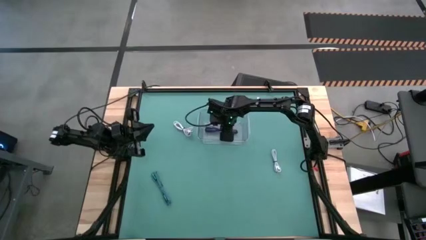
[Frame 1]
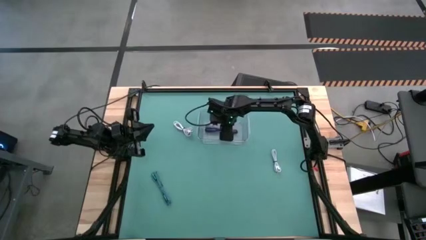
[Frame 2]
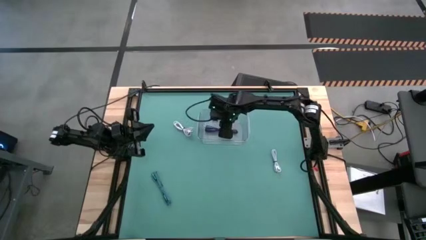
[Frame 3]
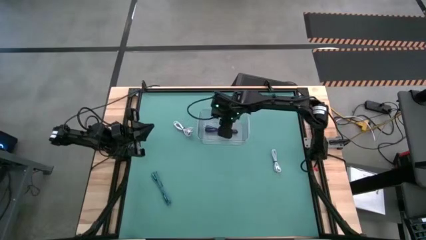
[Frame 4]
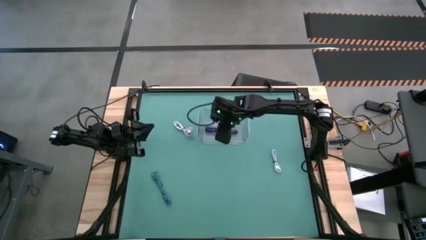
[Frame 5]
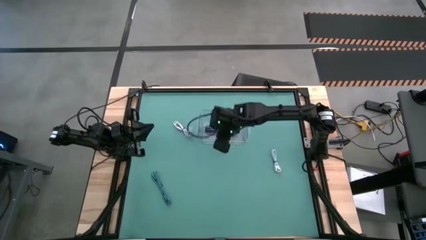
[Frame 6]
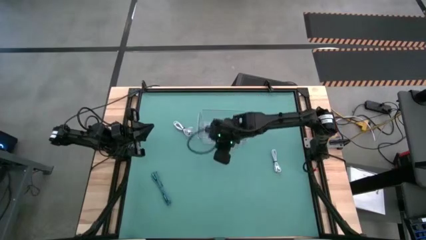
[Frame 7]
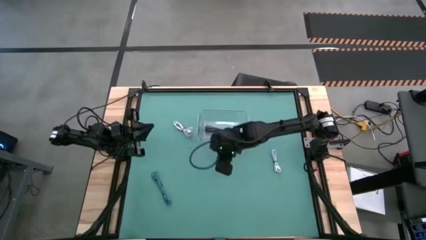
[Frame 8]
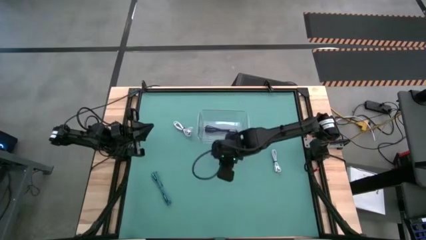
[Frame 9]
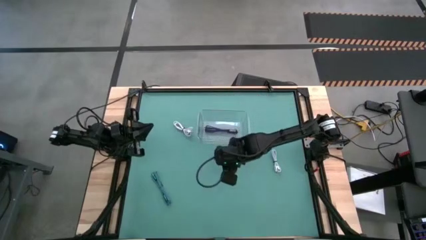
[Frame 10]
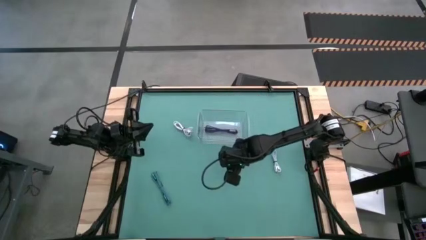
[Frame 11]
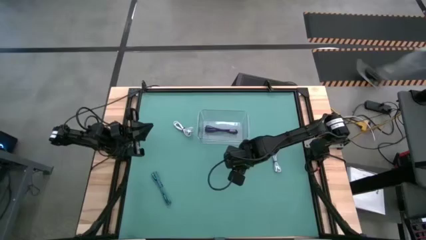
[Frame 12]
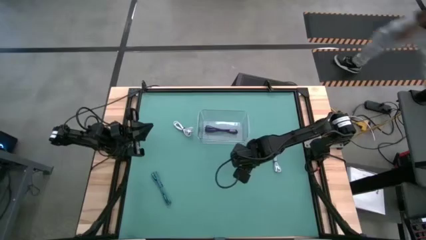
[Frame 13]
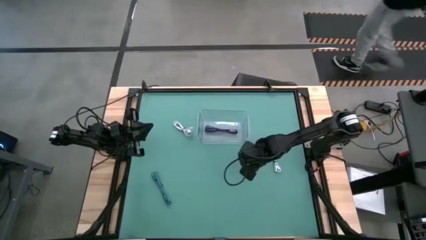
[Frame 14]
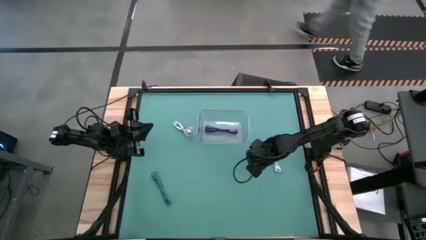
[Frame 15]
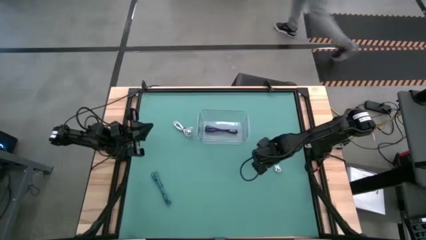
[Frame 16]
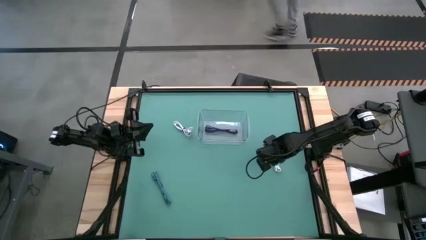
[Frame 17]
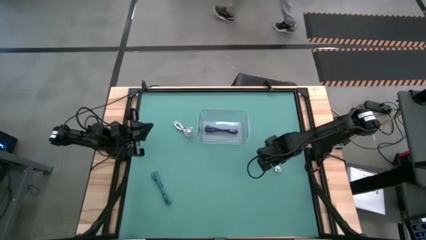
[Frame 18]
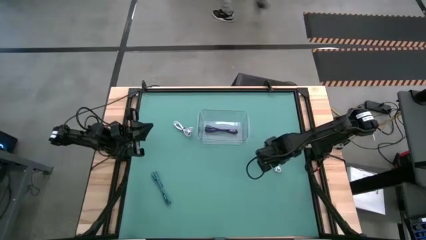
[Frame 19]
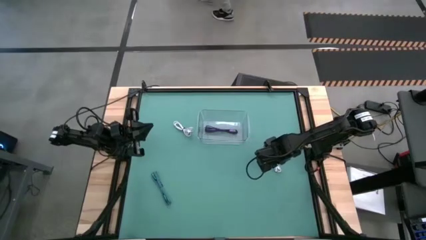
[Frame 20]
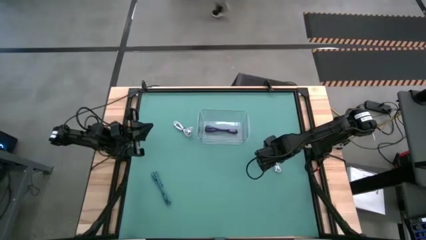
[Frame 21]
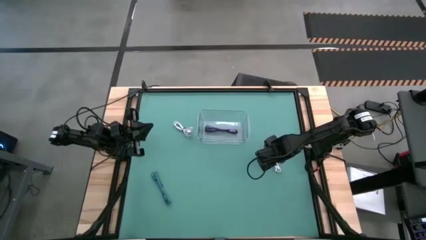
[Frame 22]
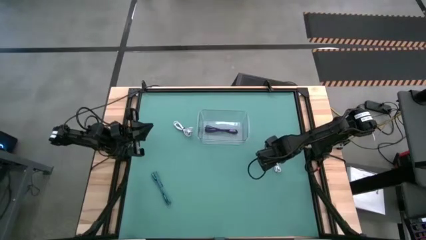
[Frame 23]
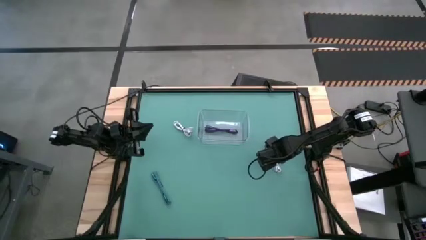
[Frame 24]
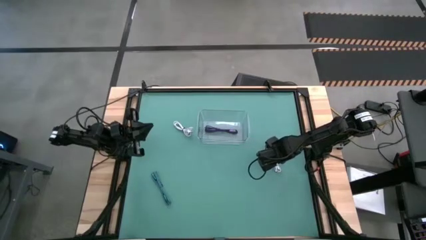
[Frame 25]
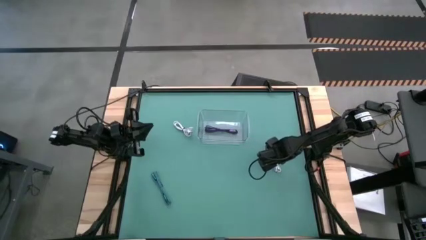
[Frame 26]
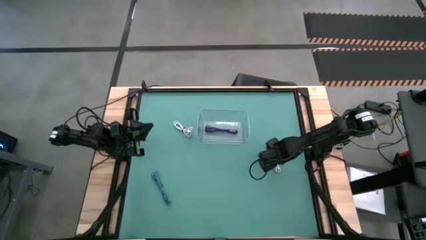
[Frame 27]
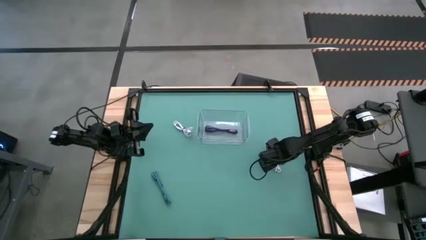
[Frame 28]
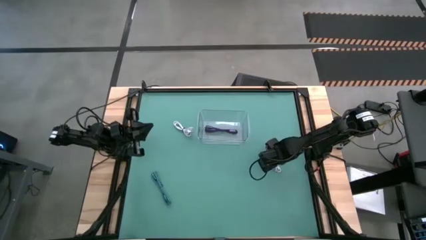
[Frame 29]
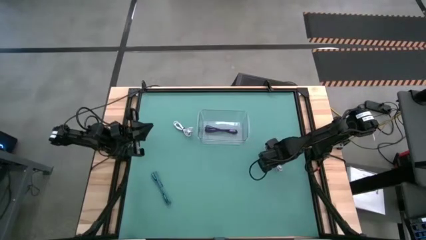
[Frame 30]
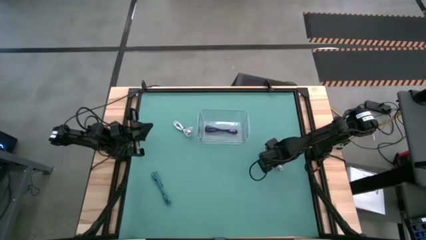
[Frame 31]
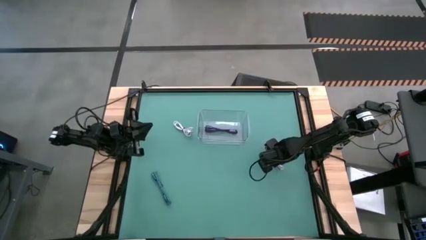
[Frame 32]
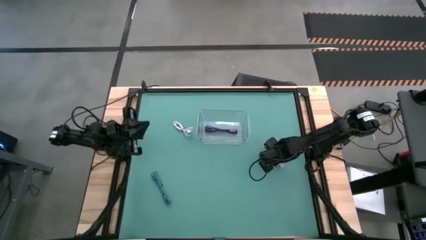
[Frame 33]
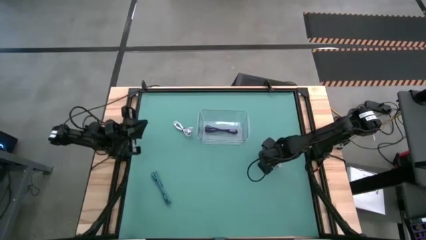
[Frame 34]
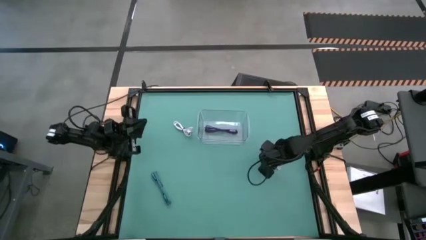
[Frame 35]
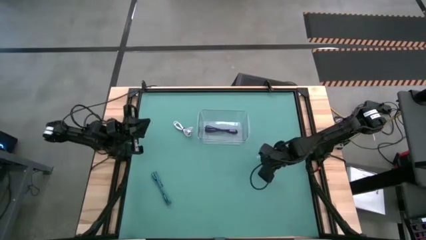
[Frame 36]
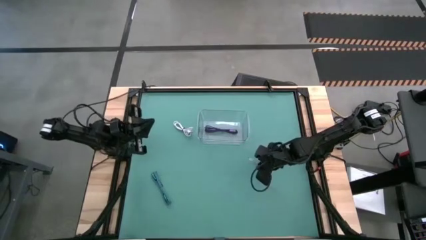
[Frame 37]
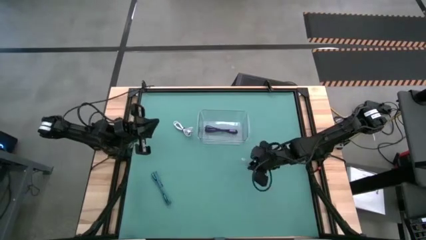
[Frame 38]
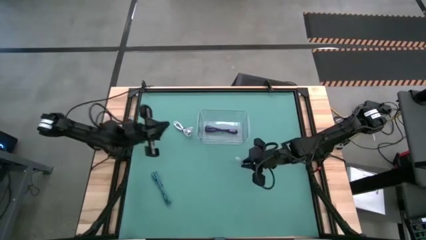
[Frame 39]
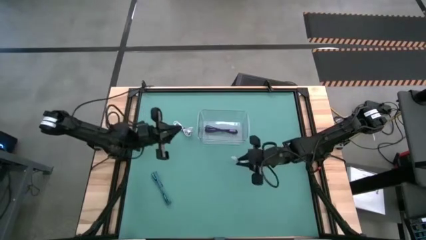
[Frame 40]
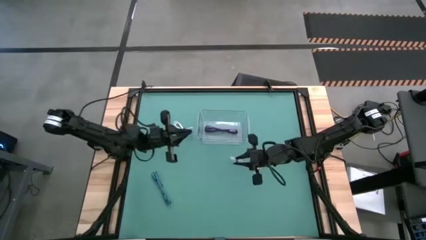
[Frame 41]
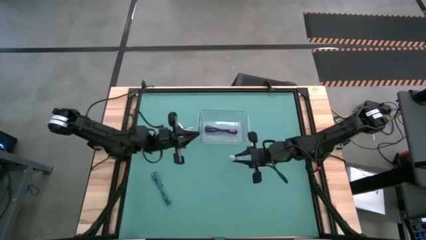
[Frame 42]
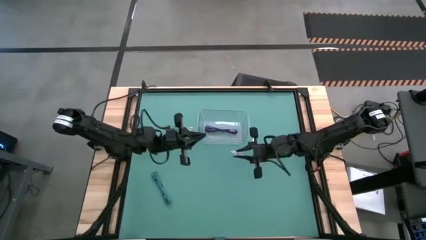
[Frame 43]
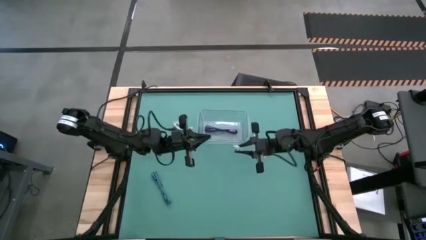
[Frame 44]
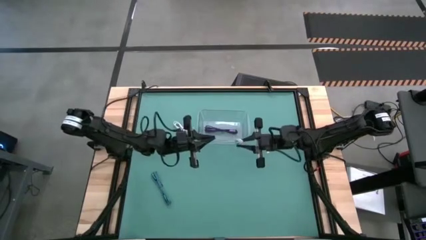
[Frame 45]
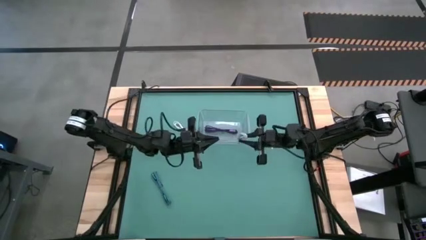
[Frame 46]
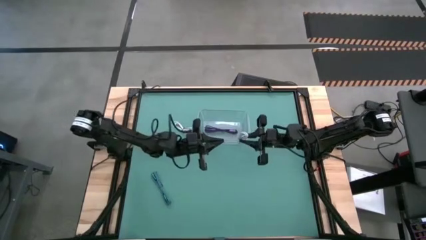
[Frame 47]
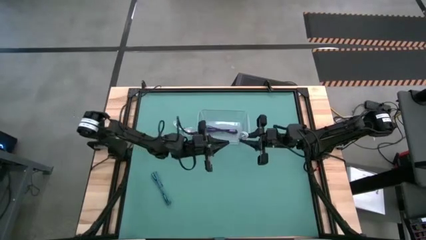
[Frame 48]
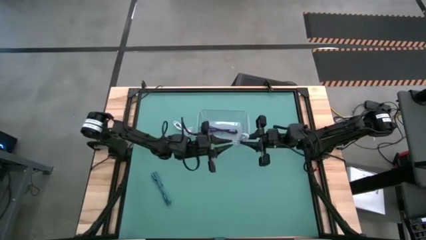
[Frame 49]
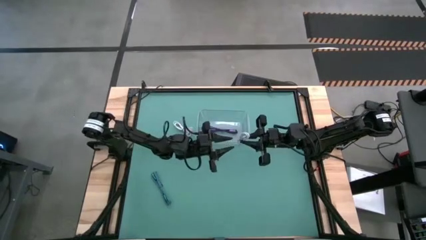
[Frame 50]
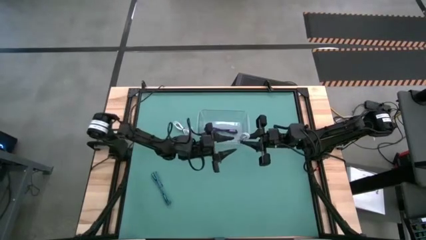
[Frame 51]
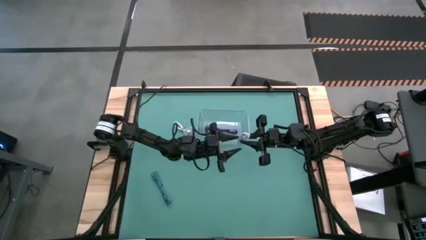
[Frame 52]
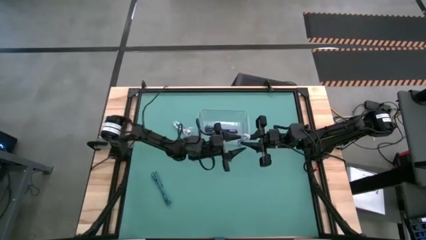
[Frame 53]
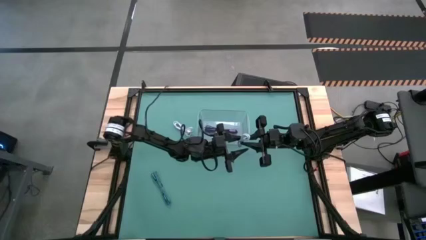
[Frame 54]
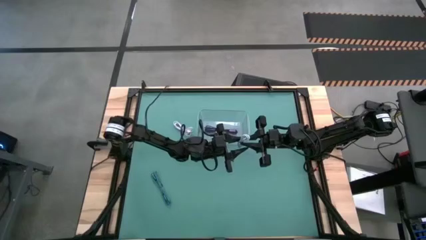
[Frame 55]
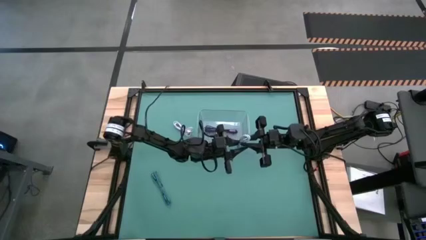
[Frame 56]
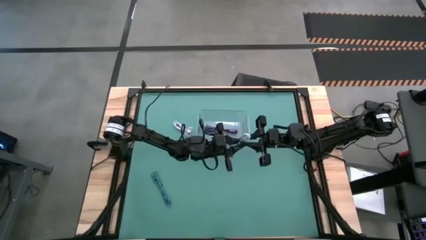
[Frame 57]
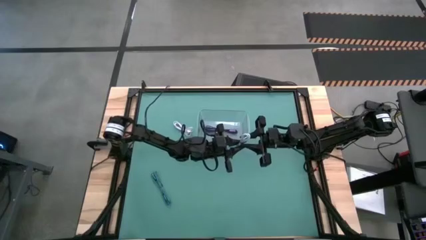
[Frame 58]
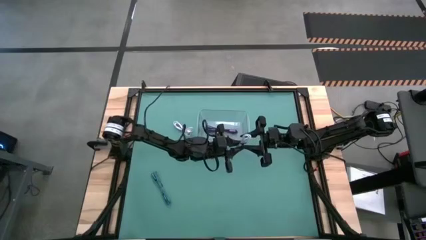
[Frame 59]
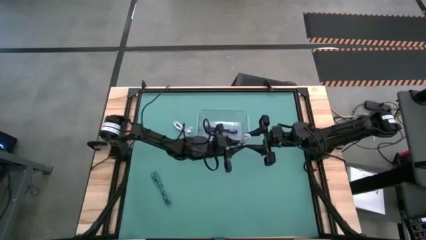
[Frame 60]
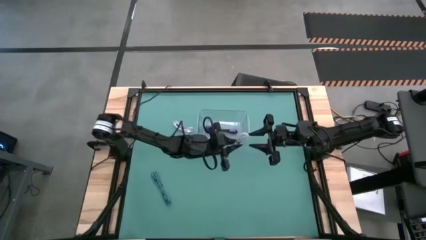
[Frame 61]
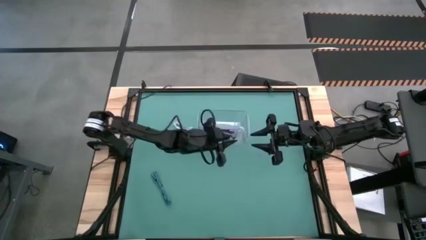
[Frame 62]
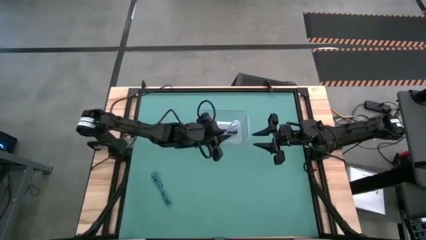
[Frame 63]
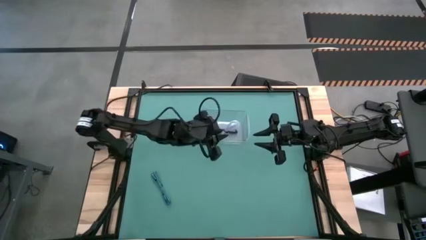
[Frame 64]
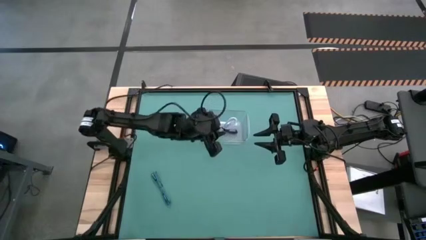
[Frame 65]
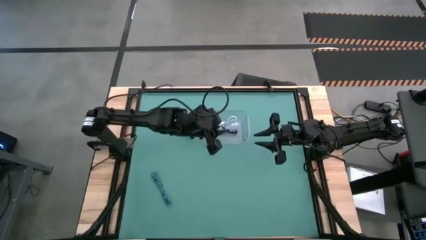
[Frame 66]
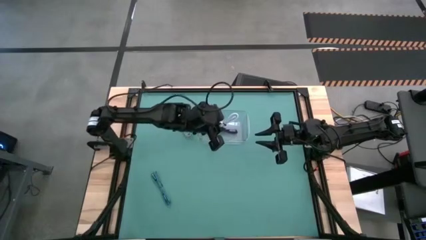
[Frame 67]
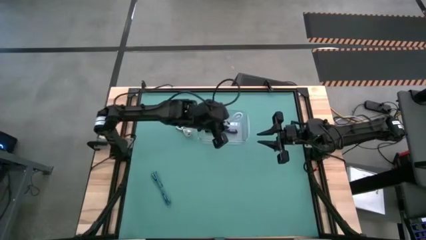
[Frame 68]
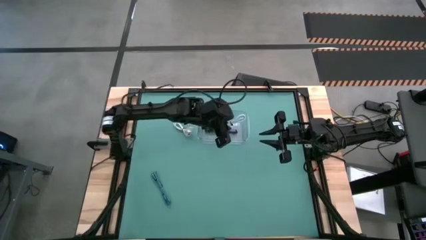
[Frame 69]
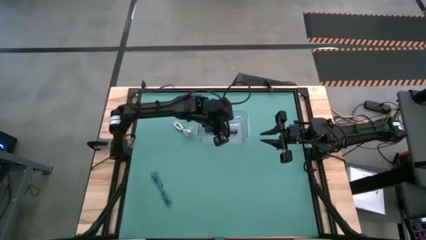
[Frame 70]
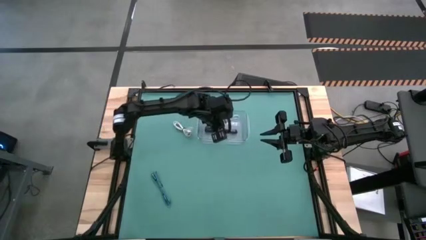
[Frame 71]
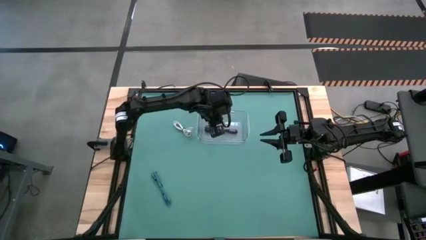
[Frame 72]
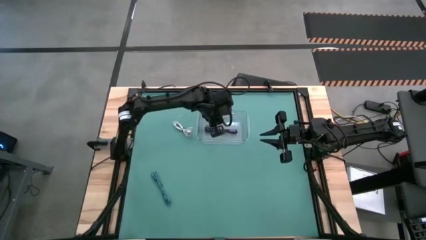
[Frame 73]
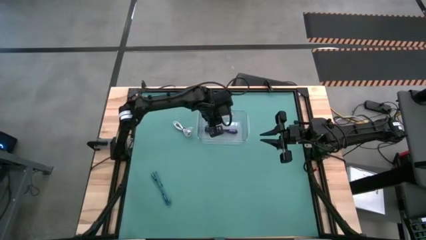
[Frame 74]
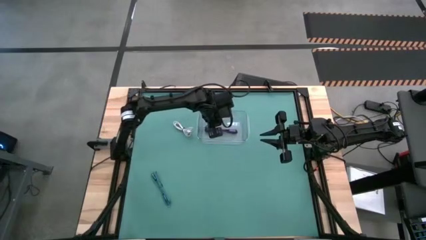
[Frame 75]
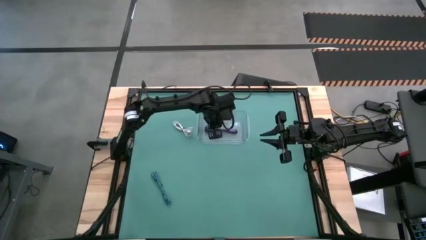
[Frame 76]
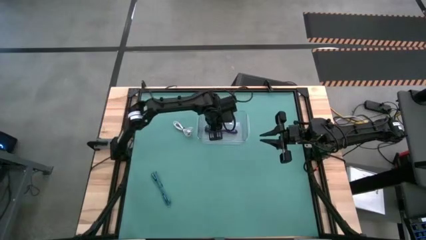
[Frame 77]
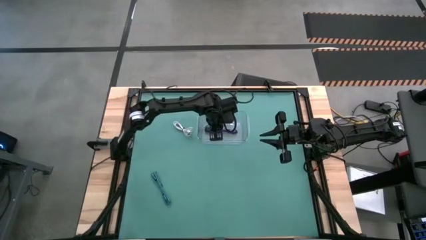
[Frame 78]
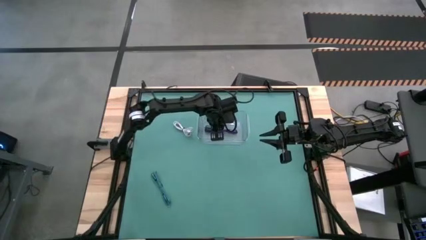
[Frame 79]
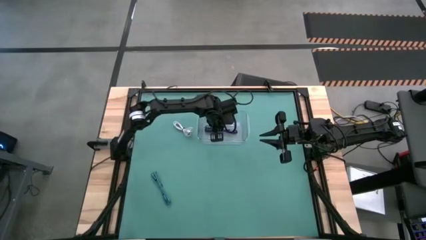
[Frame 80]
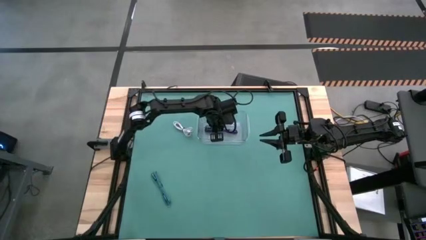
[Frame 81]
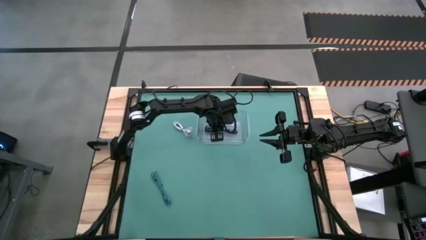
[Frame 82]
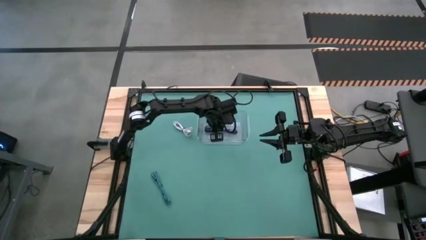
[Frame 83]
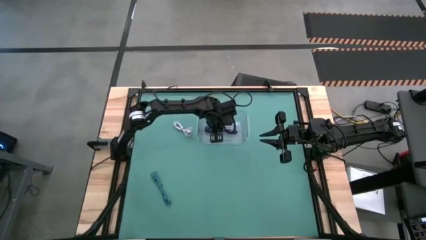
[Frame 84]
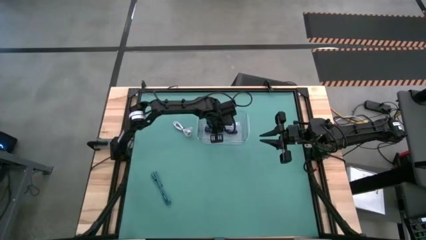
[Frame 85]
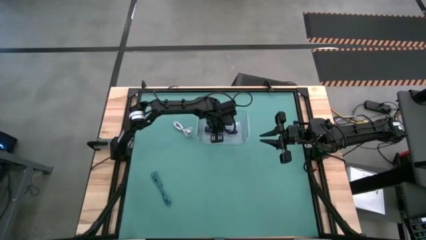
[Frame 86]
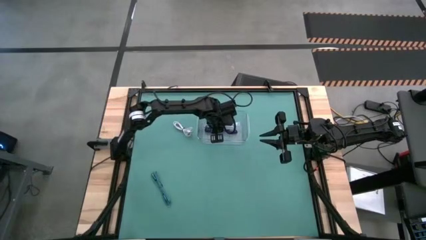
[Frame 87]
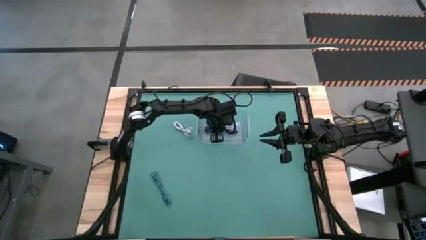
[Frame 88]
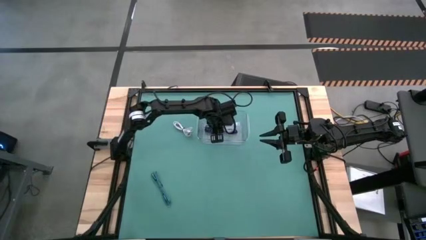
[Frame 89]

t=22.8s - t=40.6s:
Task: Pick and place USB-C Cables
Put the right white charger cable into the transparent container
